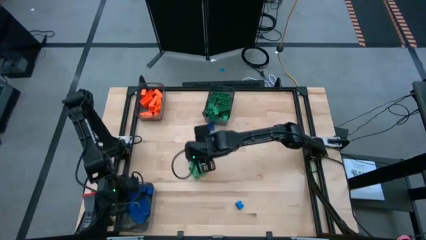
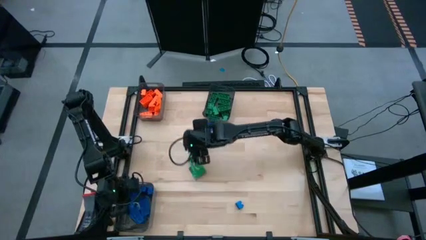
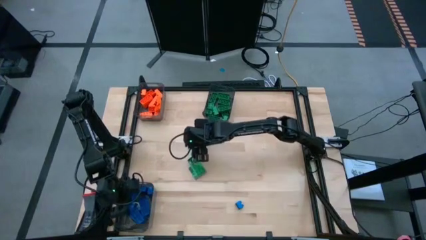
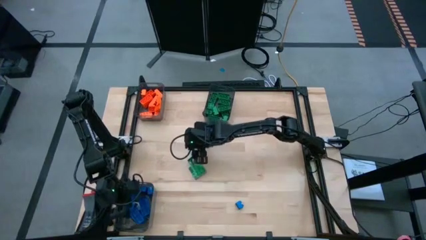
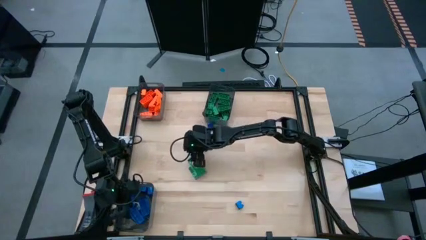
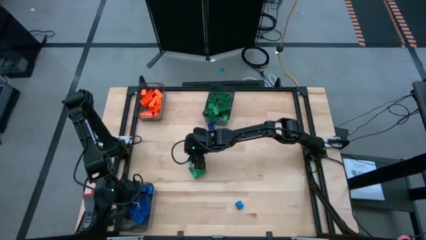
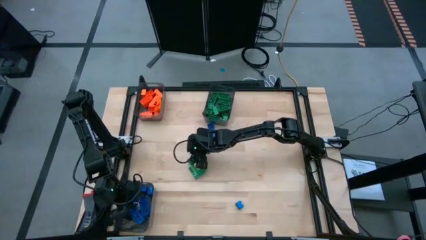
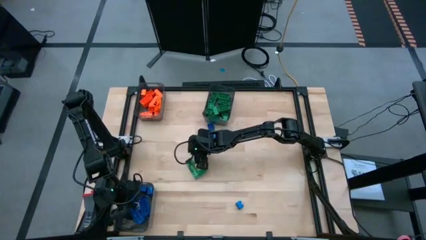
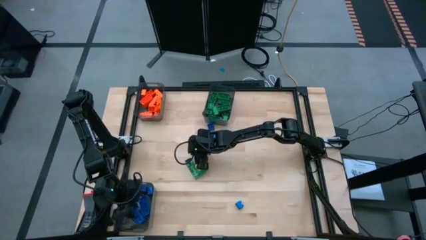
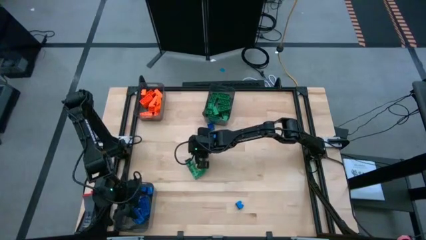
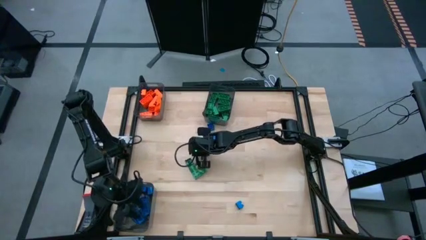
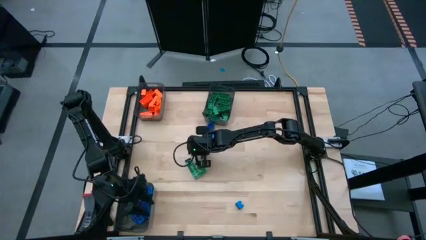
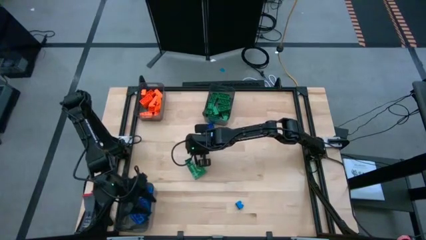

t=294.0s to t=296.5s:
Task: Sort blocks
Put the blue game piece into the bottom left black transparent bin

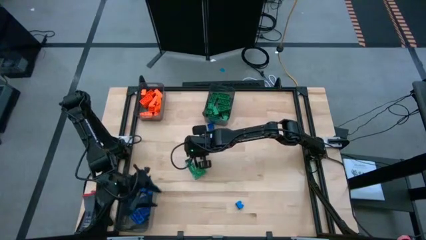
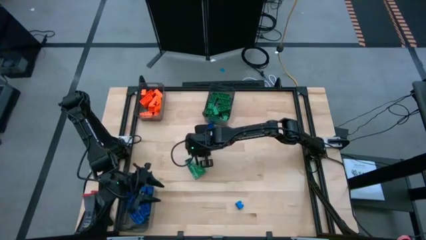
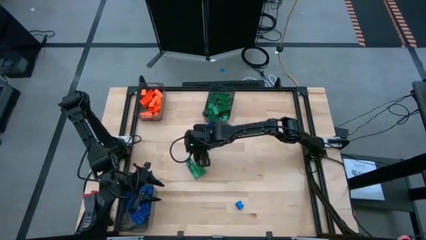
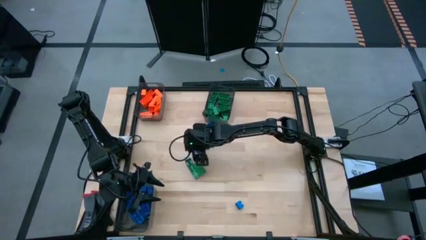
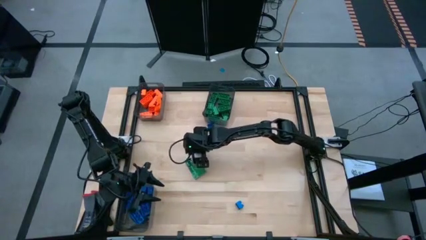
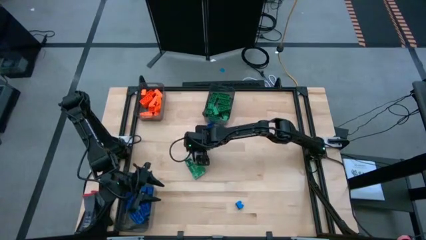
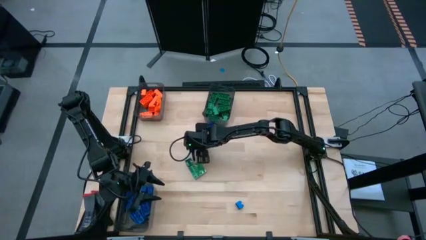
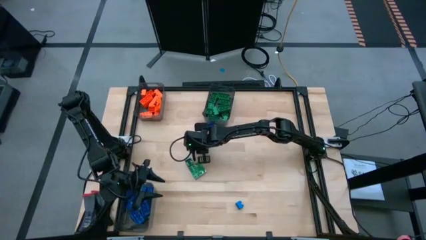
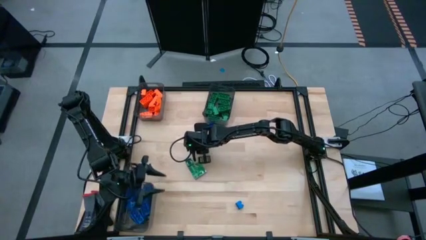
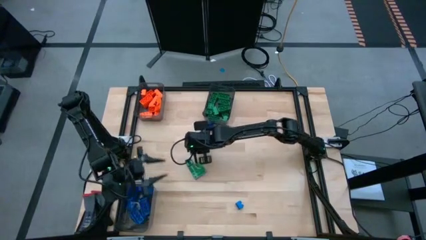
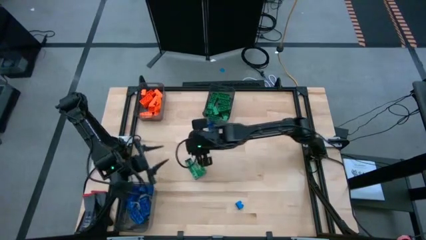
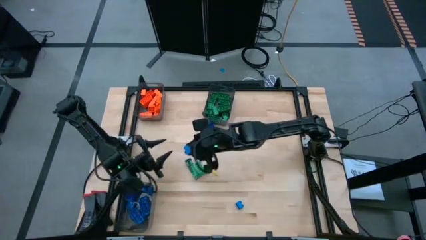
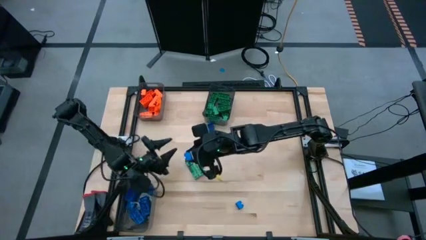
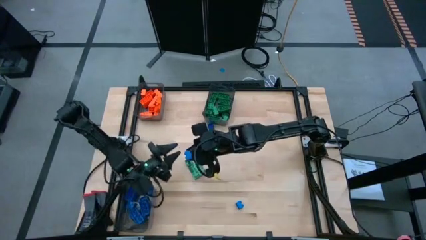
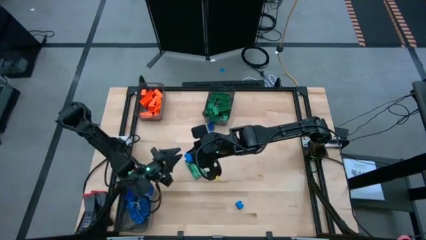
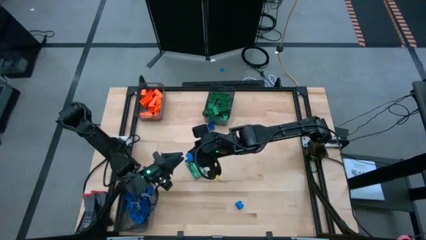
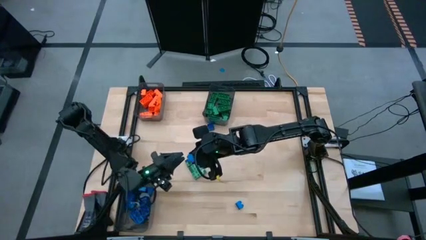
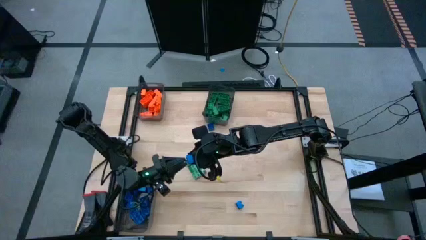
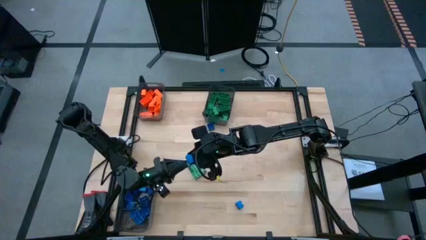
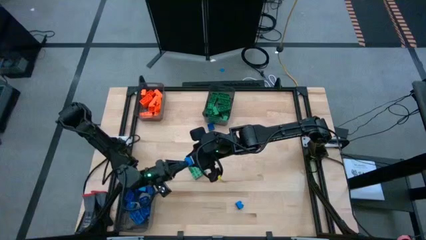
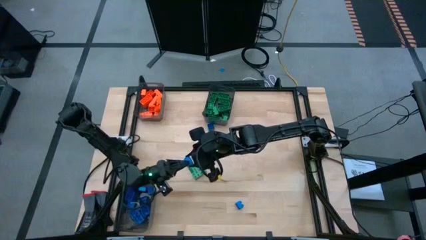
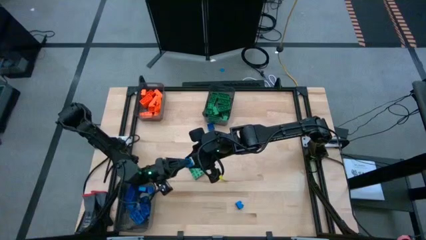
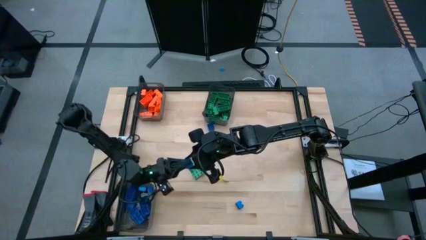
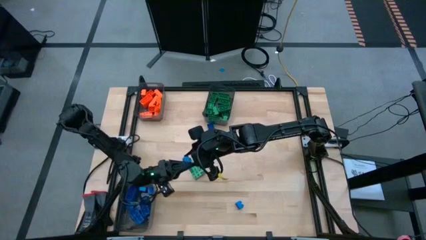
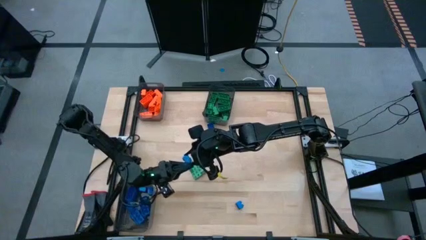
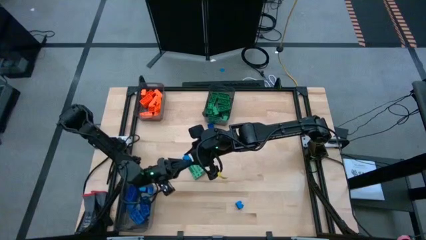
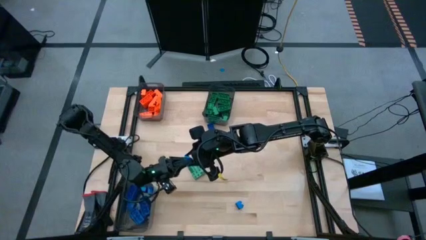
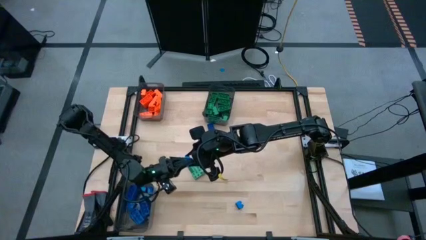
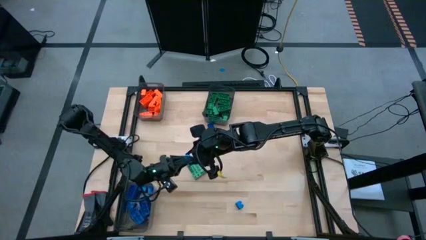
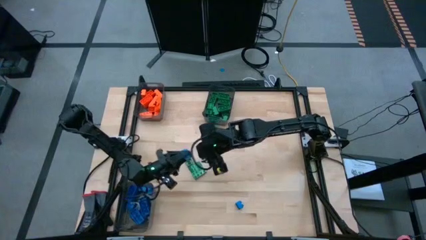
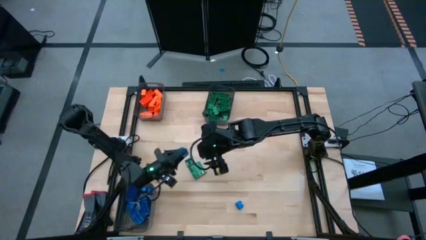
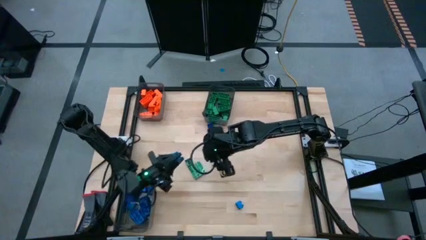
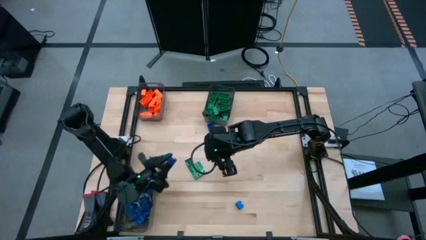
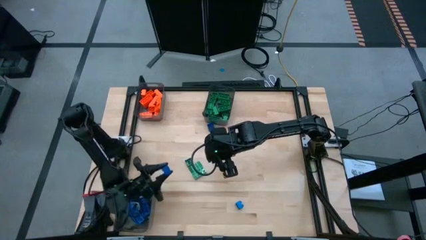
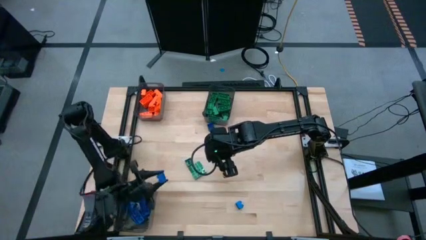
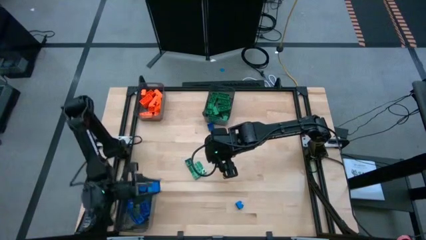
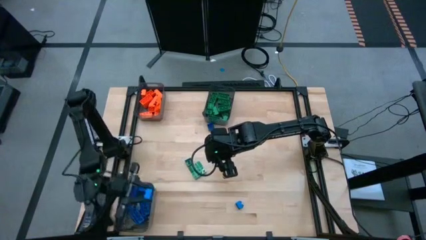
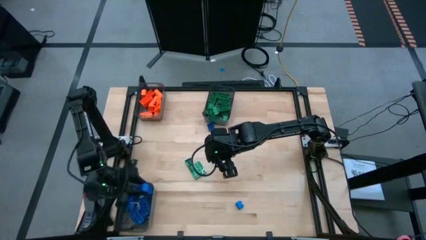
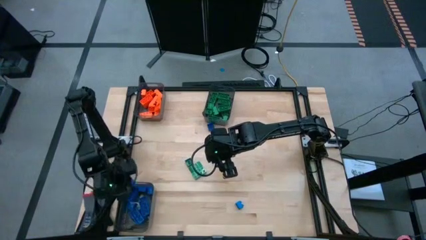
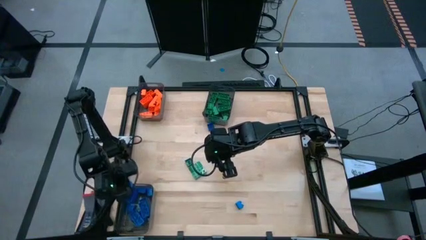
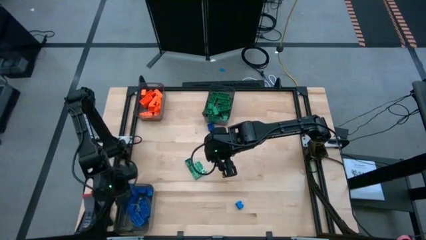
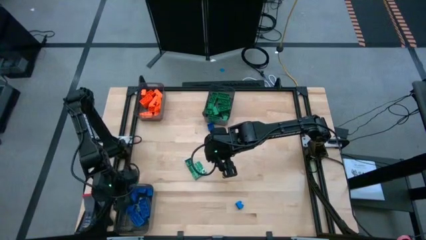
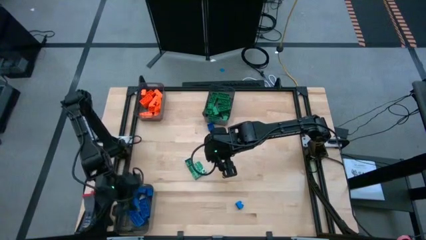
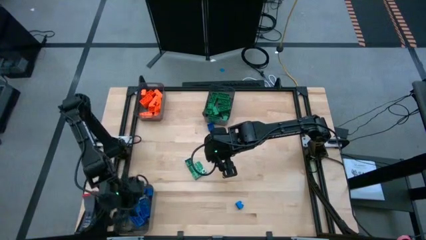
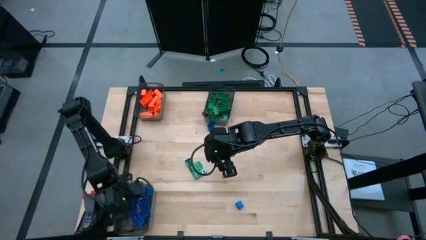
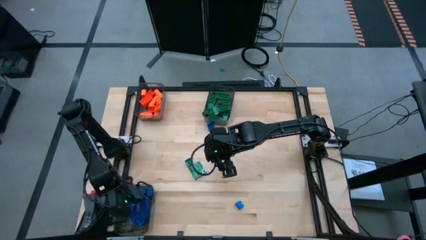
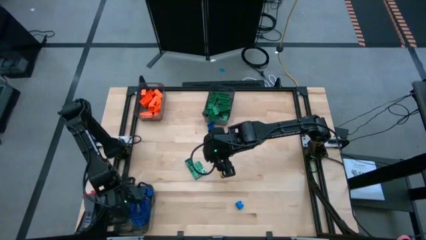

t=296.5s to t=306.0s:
Put the blue game piece into the bottom left black transparent bin

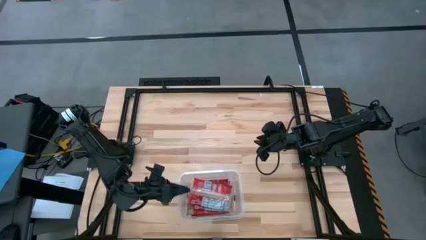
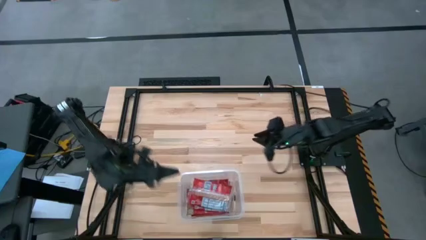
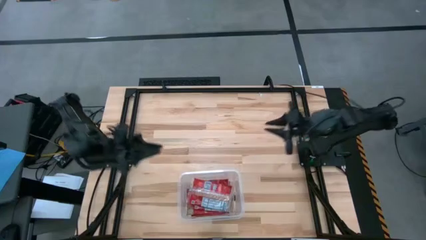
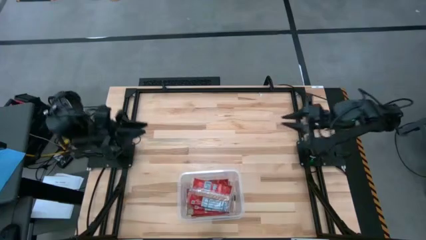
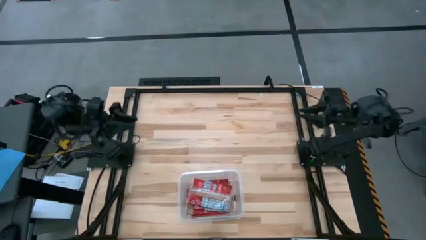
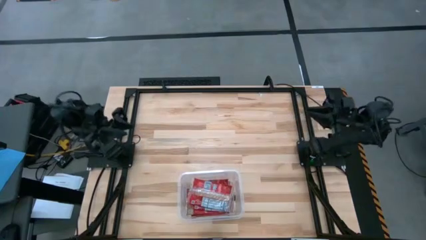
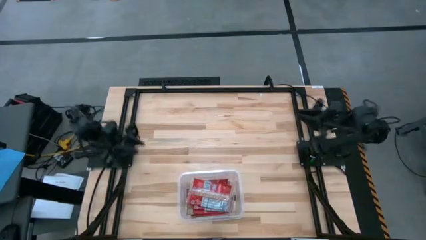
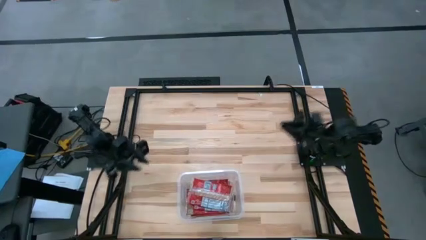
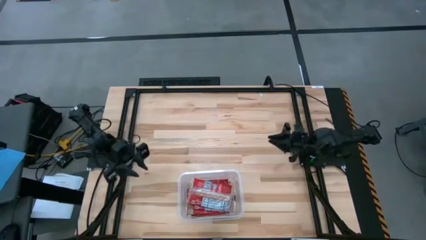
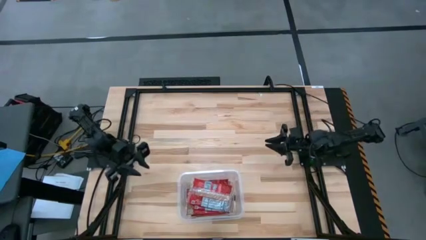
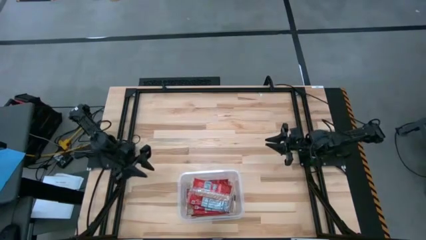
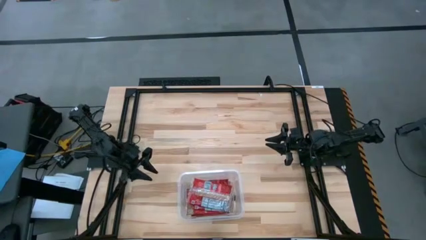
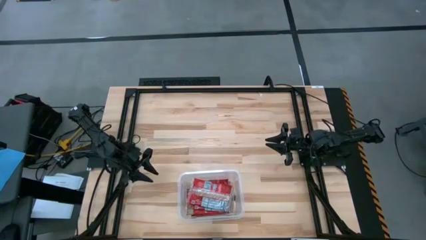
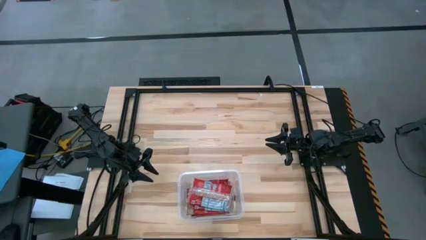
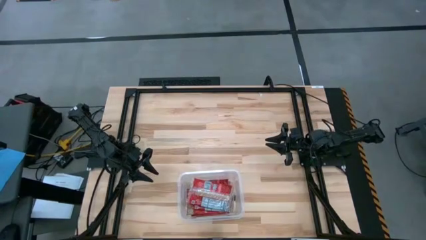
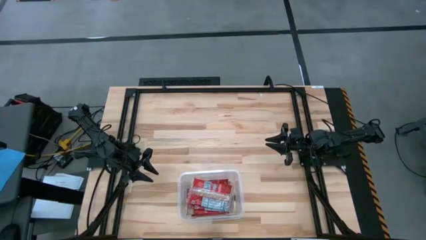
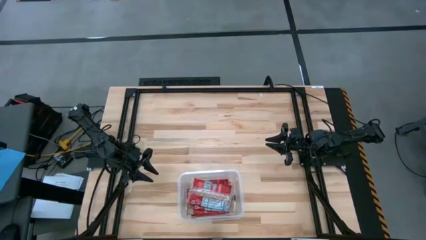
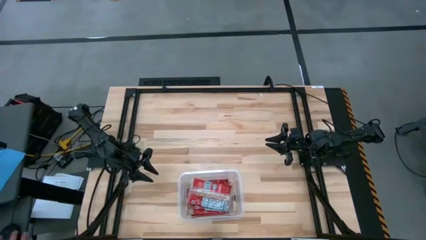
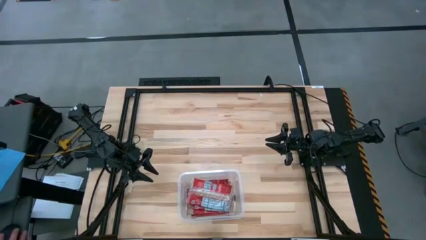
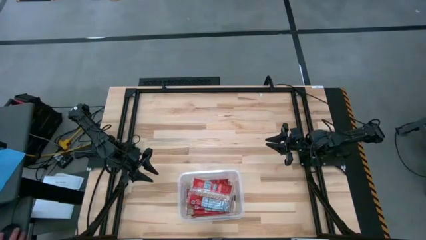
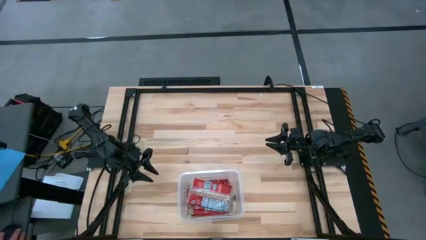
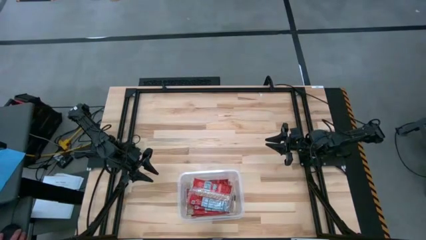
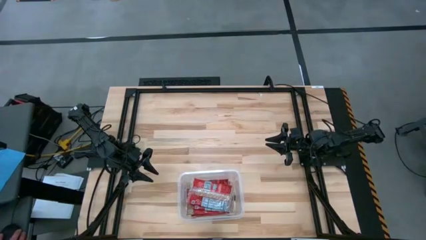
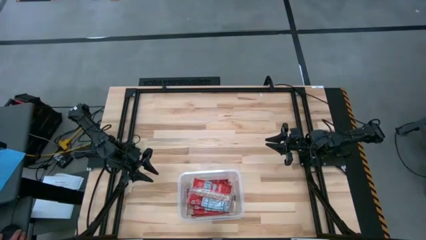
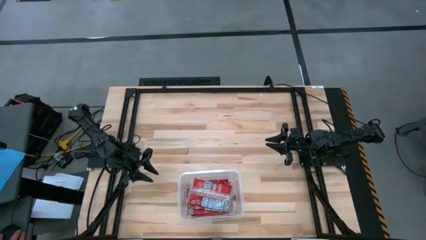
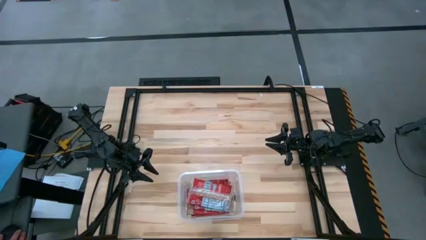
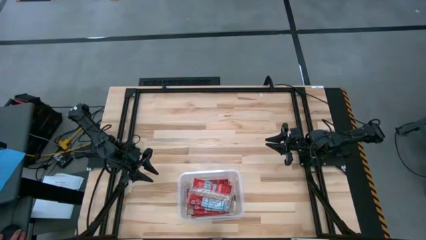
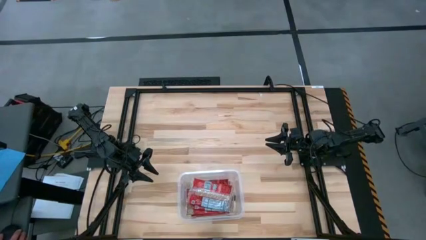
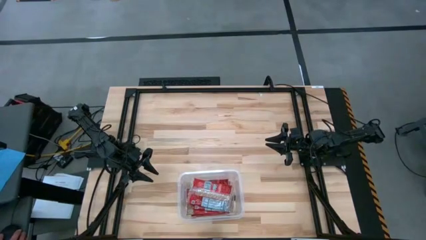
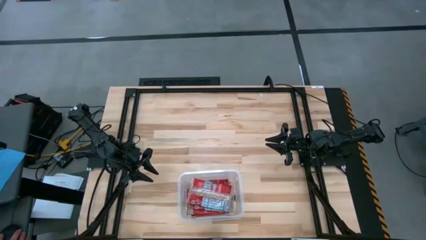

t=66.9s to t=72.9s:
Task: Sort popcorn bags into baskets
Return to Home Position
